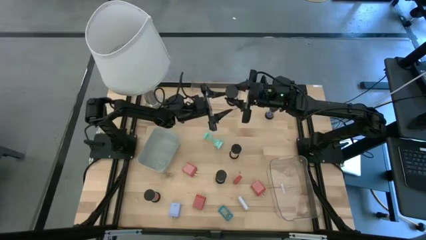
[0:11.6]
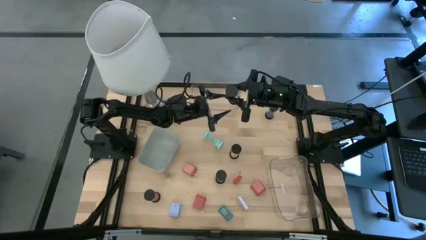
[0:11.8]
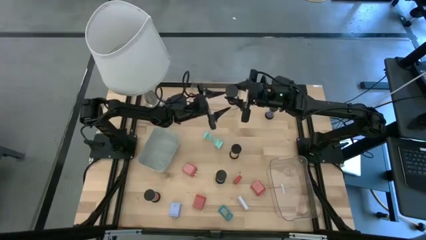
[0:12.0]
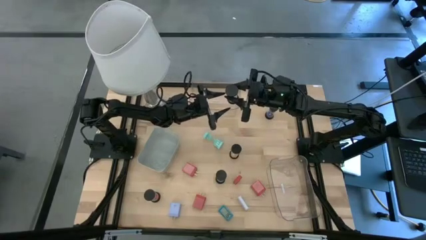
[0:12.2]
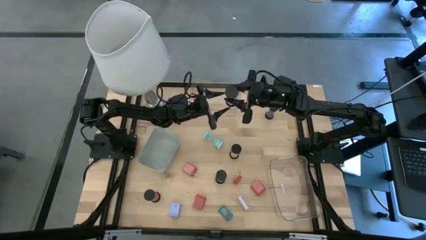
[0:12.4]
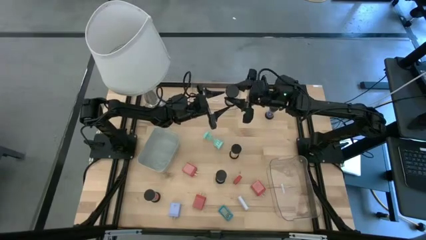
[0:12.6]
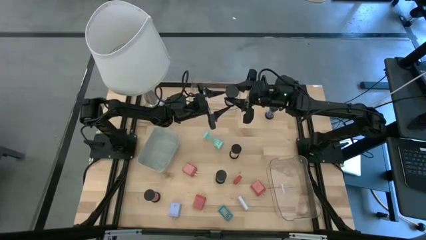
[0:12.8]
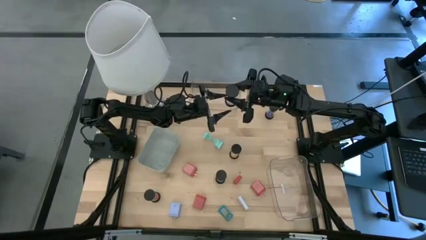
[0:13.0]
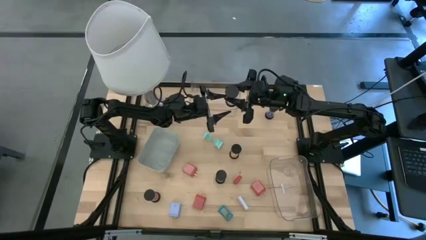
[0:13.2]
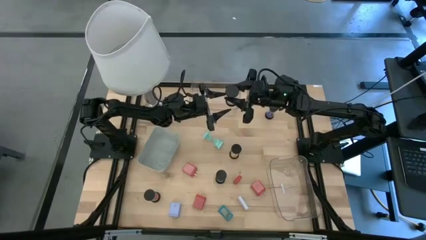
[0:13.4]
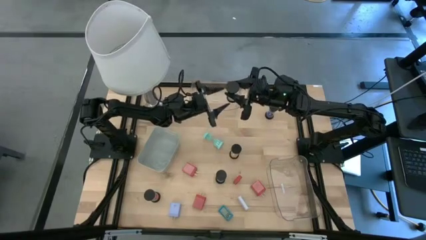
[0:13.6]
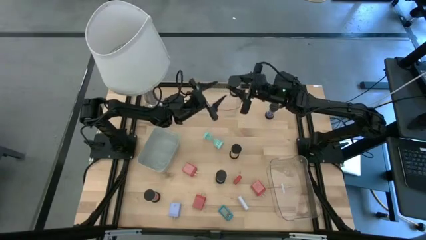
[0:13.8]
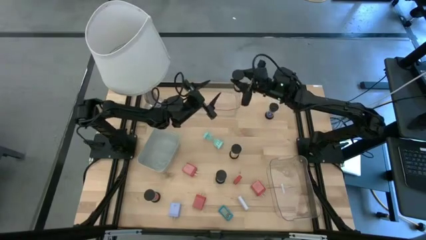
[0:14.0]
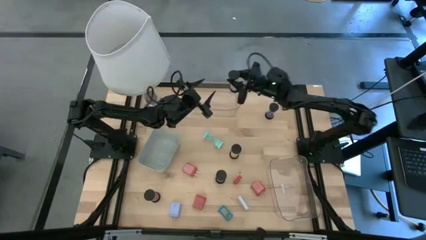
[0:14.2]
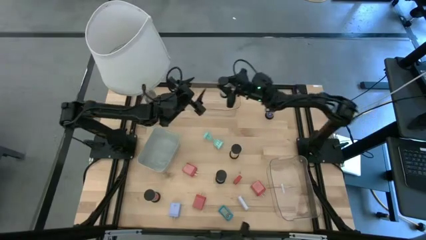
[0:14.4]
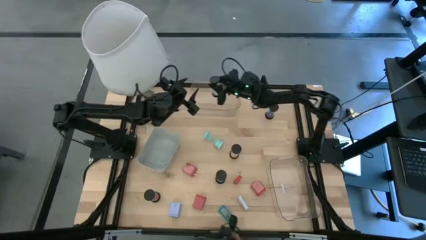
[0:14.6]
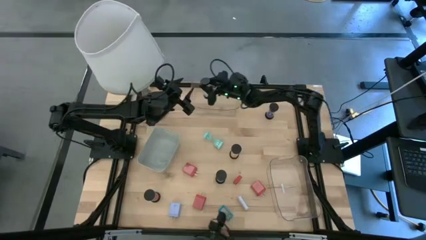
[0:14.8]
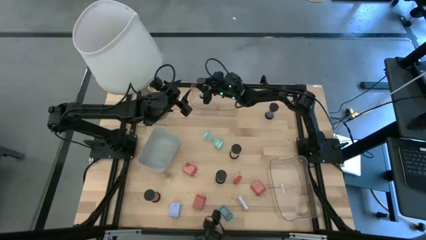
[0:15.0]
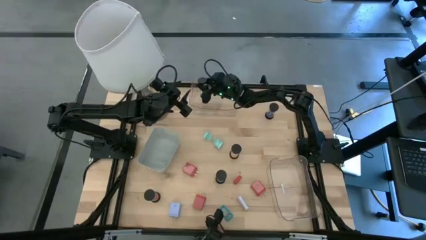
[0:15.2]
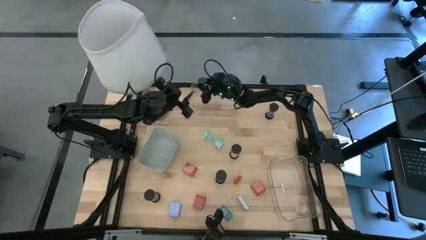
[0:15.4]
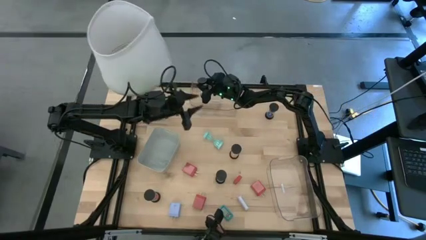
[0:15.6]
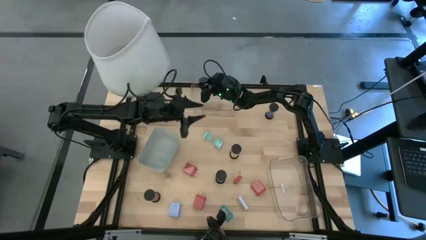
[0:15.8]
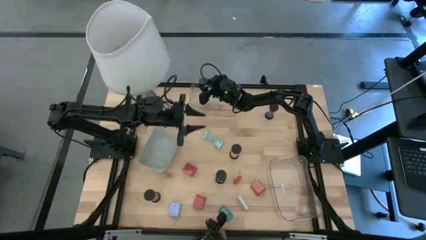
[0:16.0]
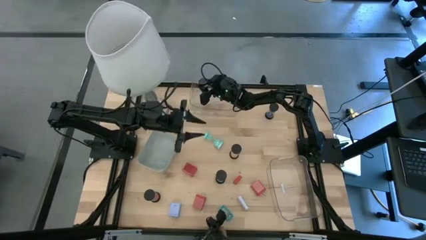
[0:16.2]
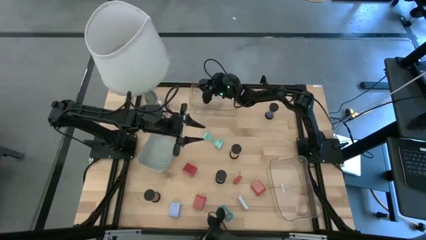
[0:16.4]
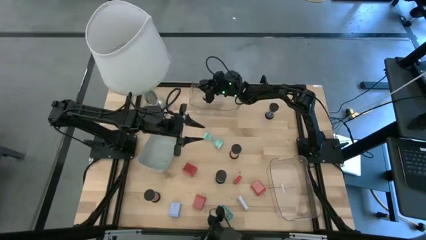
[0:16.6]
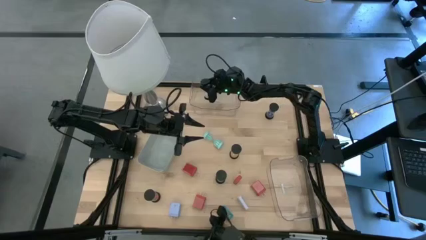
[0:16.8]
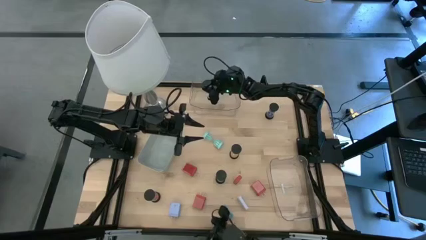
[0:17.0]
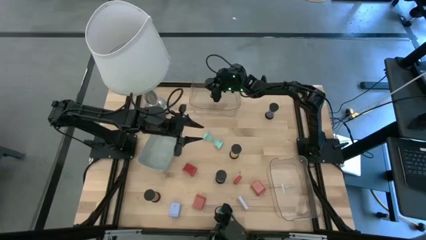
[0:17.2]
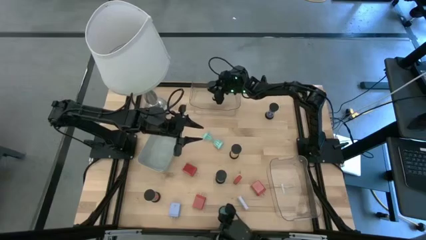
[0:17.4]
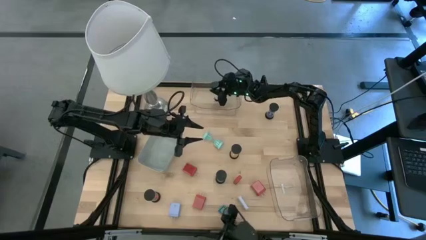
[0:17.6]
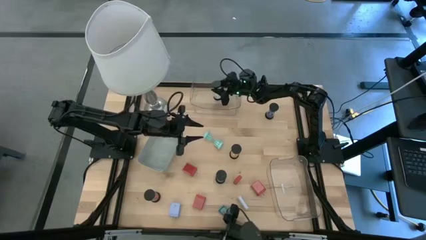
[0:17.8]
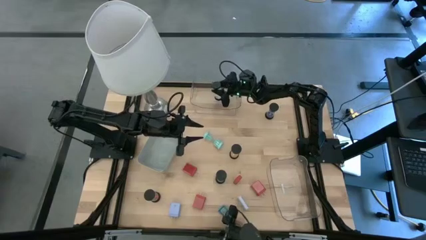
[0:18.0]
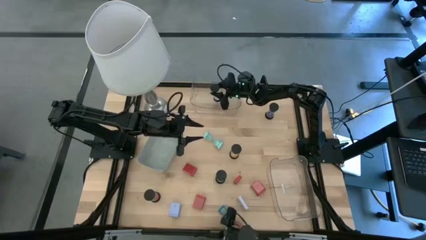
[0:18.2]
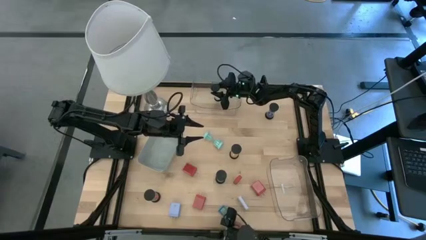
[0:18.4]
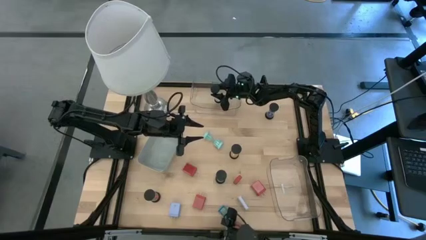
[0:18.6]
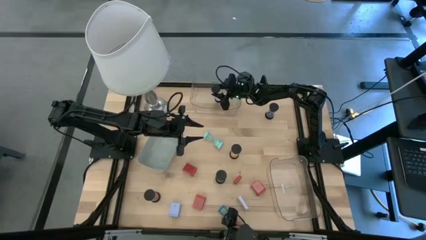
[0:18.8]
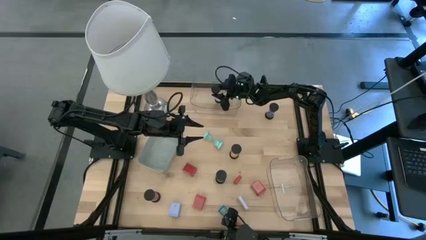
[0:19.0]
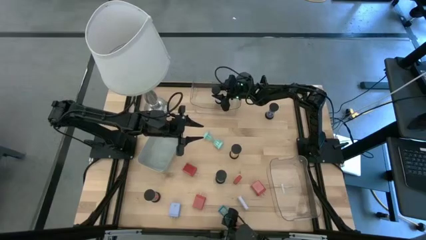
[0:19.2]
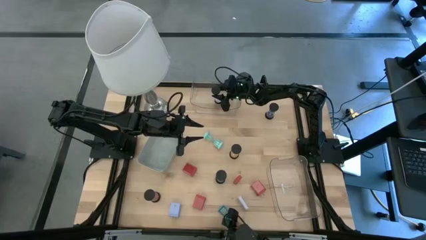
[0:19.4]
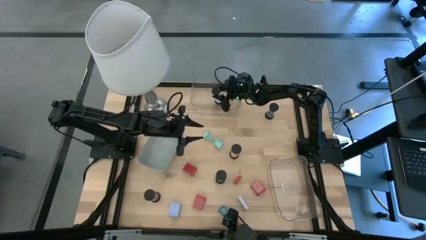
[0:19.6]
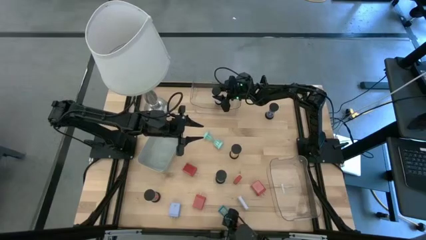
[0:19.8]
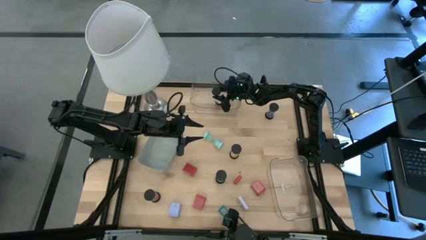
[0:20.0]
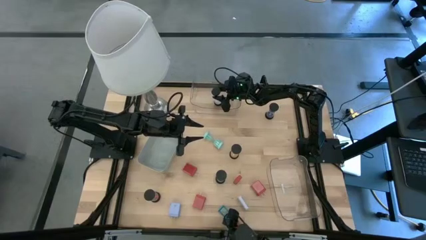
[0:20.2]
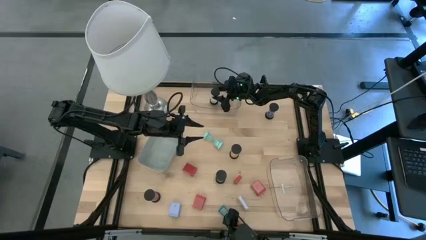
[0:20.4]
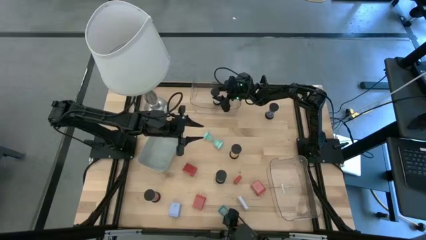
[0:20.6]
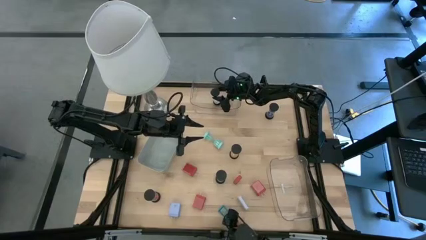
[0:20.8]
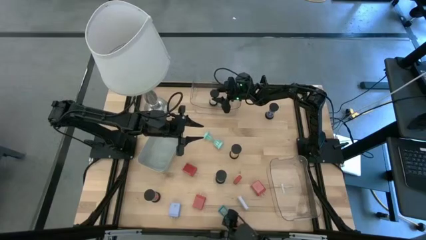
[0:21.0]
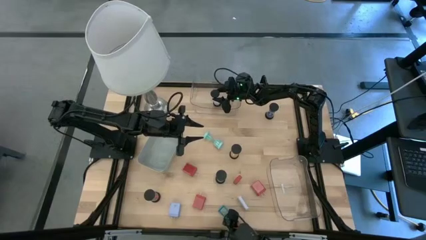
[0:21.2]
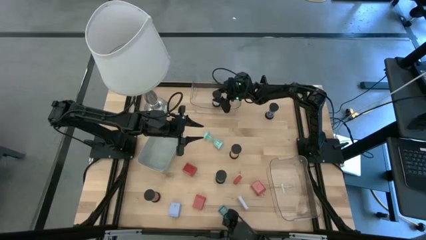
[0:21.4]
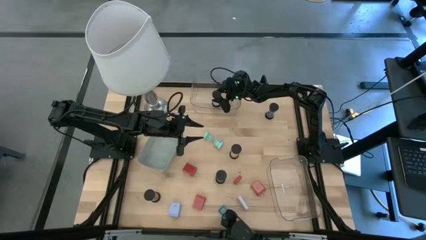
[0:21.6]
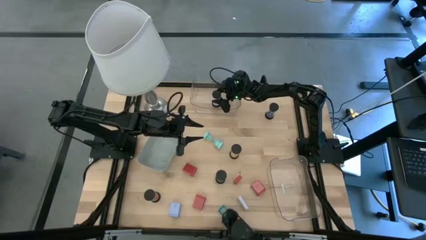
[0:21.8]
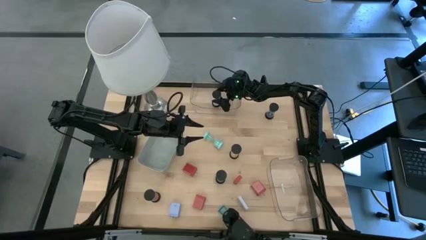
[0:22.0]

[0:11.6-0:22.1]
Task: Pick & Place Office items
Put the white hourglass into the top transparent bin

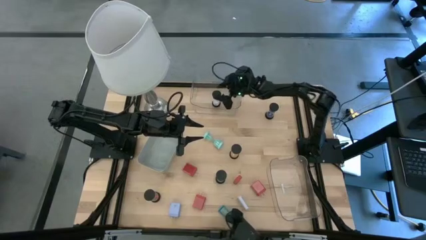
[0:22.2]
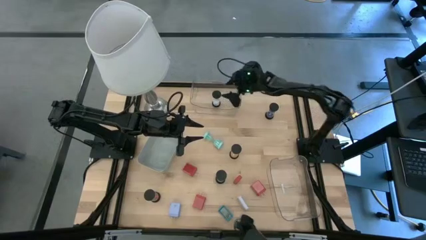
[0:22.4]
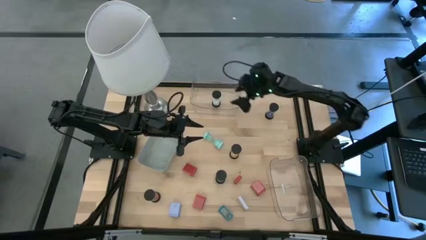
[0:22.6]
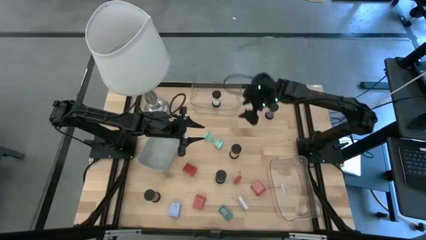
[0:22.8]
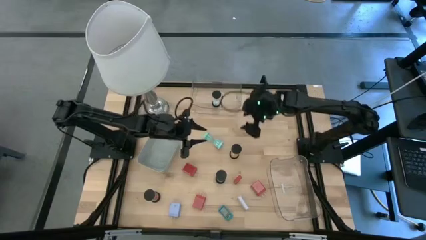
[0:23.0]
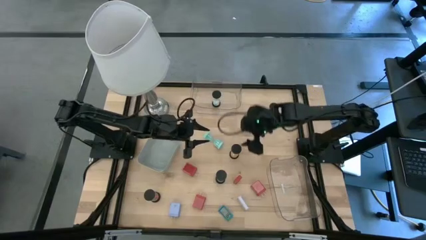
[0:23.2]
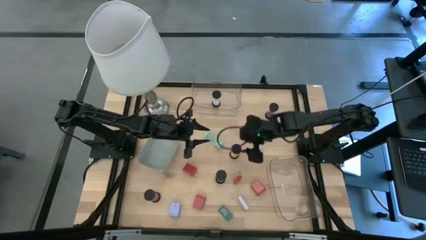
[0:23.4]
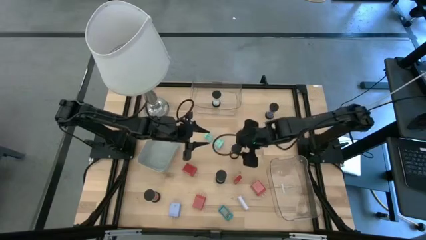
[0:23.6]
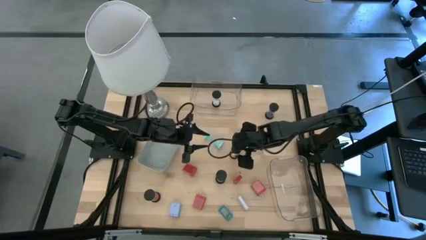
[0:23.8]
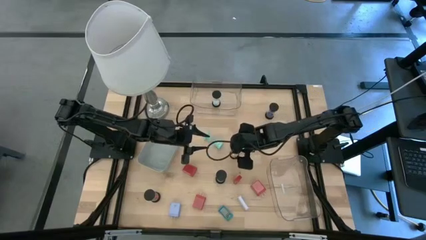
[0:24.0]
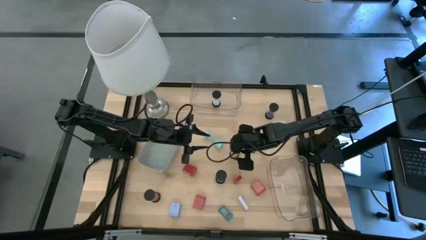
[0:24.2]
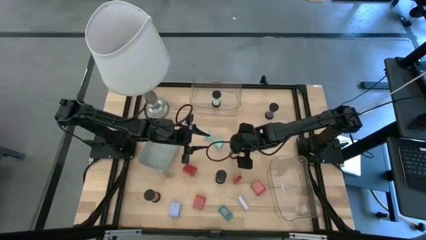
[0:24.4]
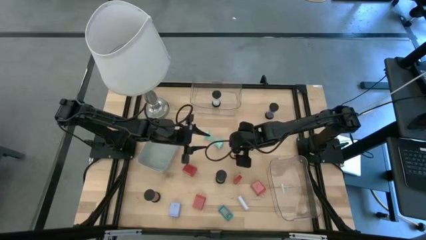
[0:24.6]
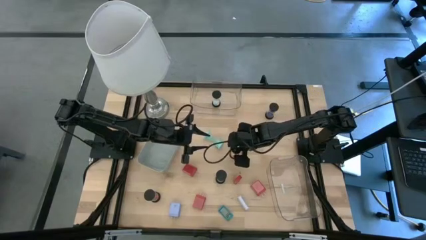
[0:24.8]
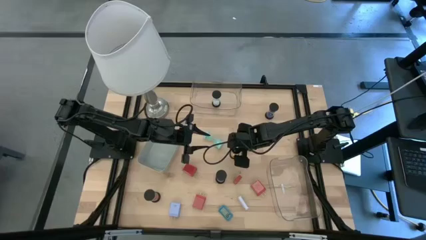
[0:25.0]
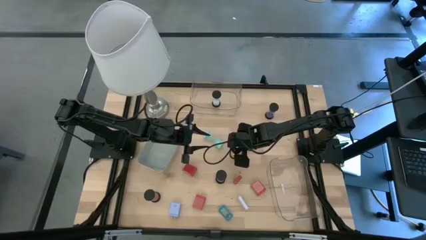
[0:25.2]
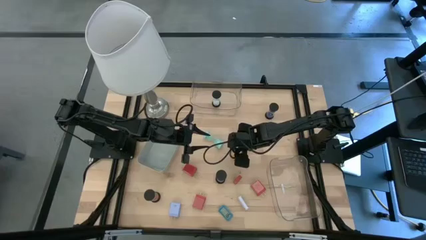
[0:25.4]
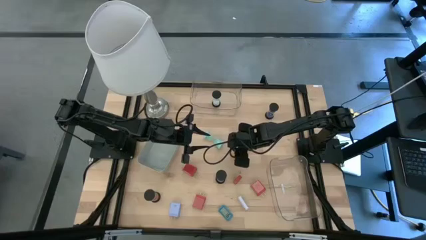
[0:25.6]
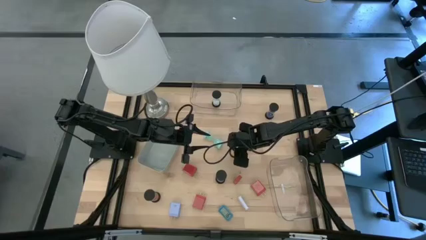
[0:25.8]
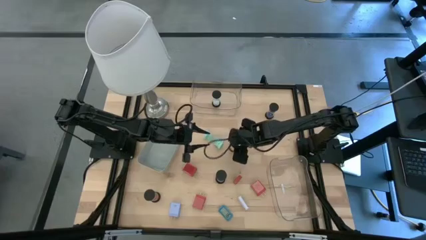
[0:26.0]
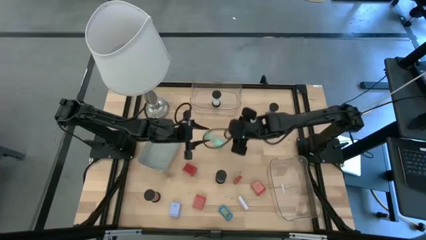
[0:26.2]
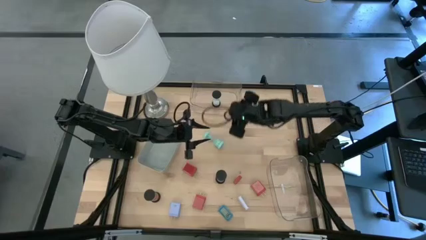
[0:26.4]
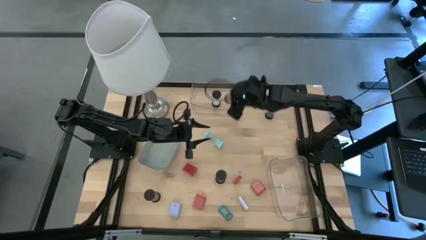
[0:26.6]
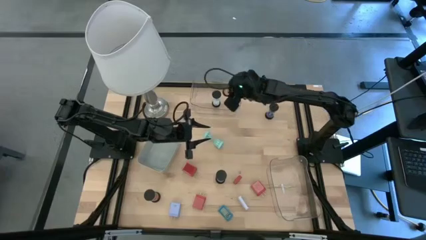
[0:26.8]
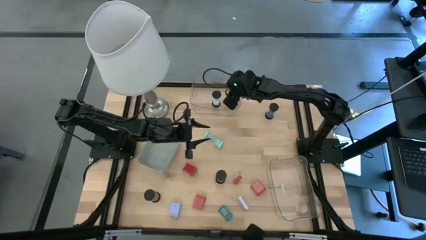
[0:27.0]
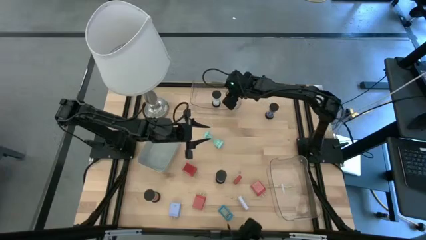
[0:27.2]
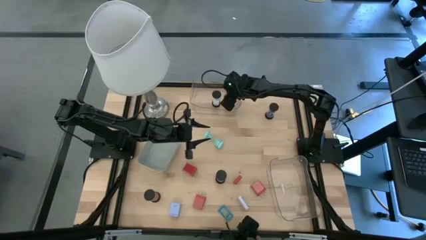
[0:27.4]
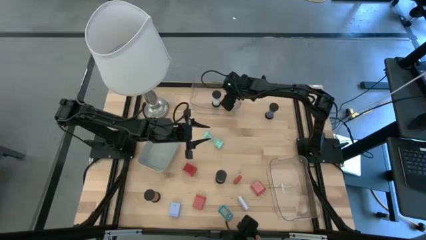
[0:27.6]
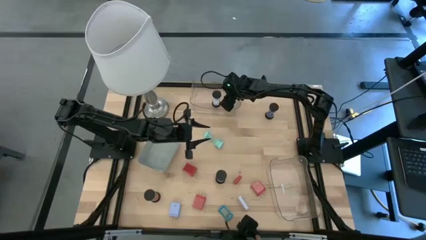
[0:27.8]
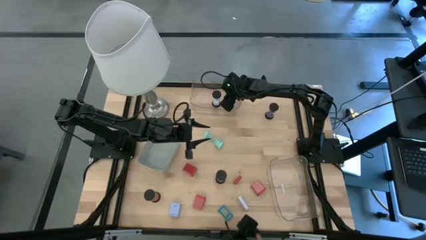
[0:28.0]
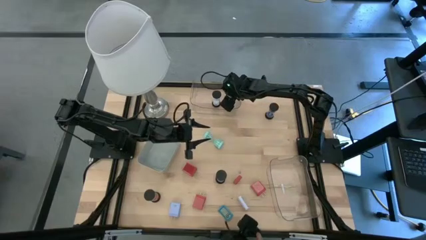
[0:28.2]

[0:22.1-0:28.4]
Put the orange hourglass into the top transparent bin
